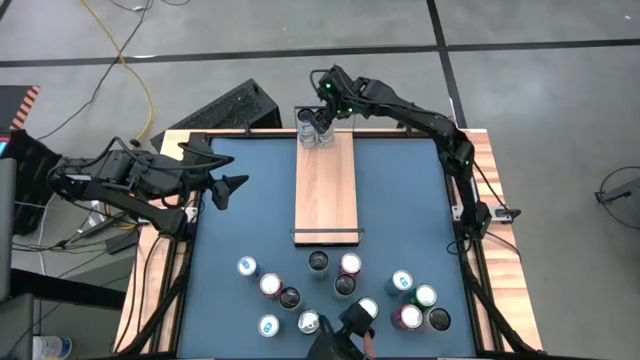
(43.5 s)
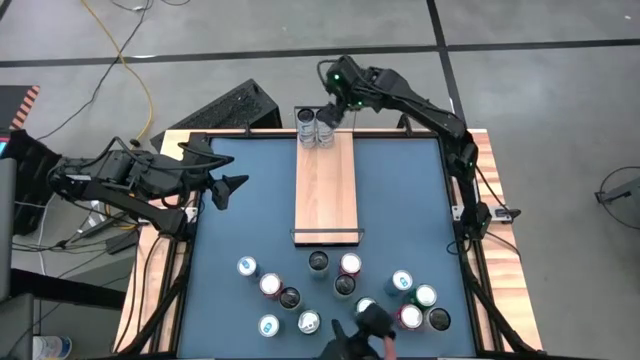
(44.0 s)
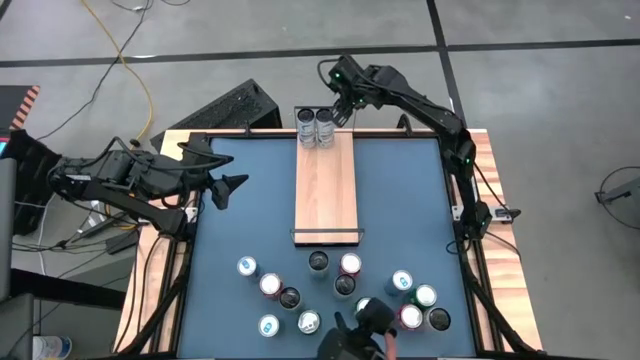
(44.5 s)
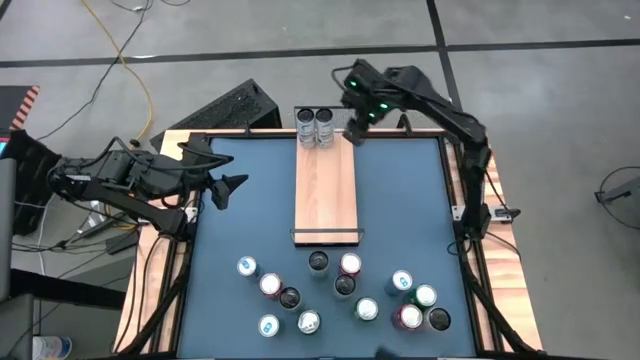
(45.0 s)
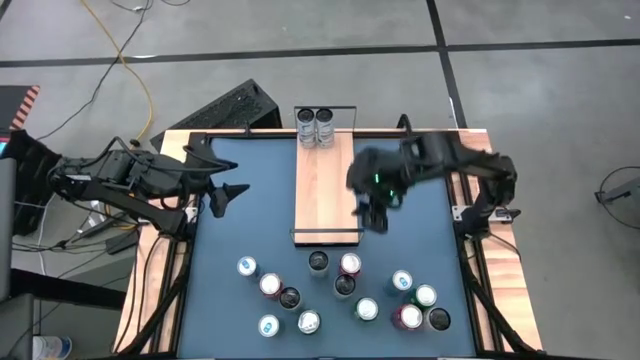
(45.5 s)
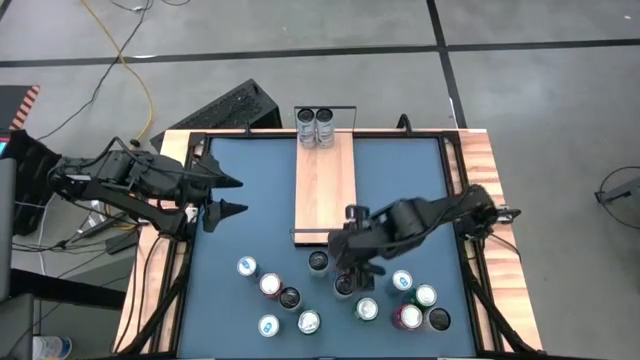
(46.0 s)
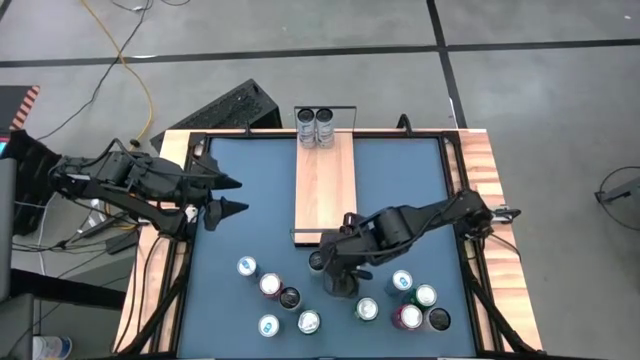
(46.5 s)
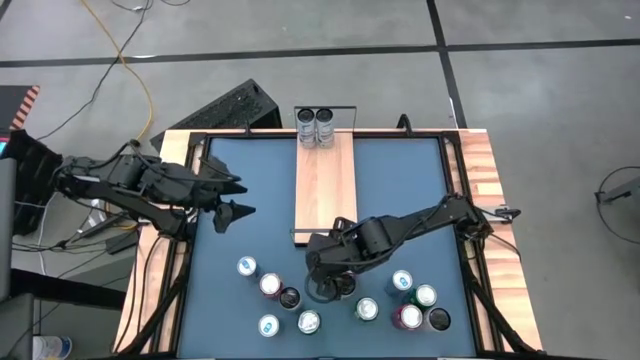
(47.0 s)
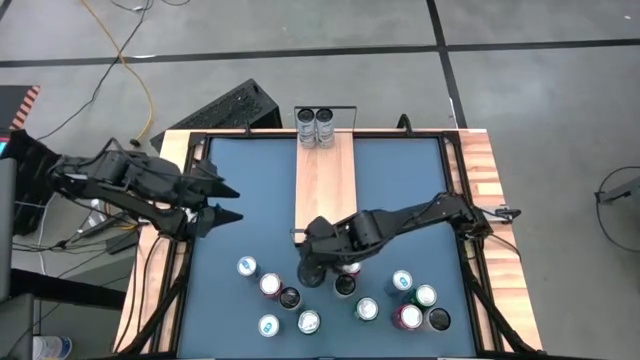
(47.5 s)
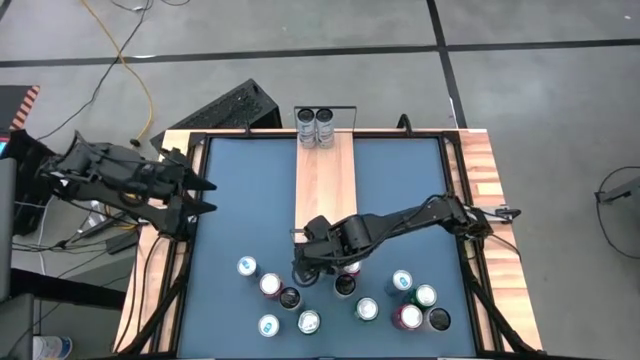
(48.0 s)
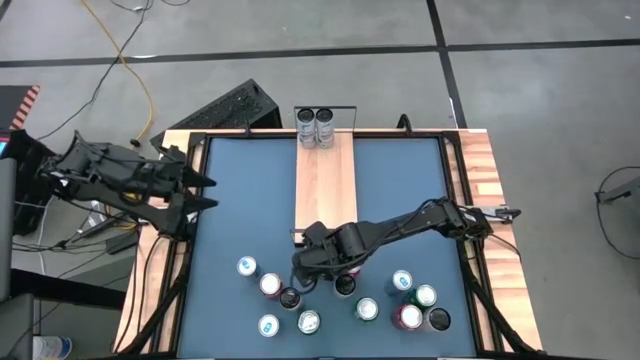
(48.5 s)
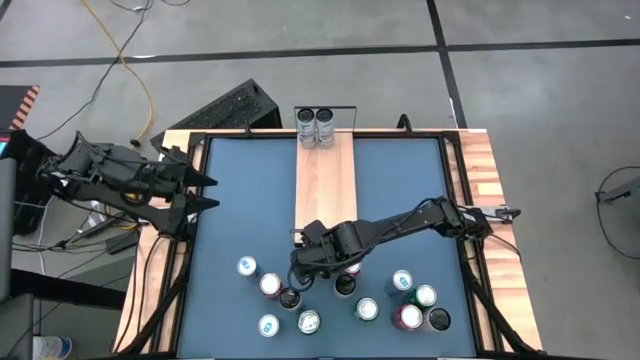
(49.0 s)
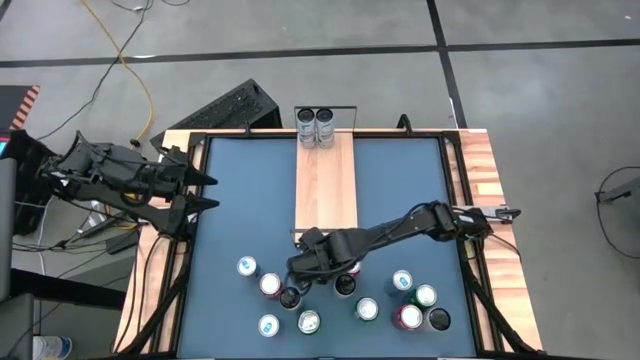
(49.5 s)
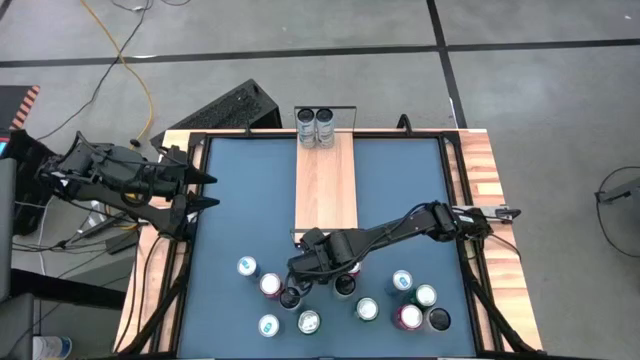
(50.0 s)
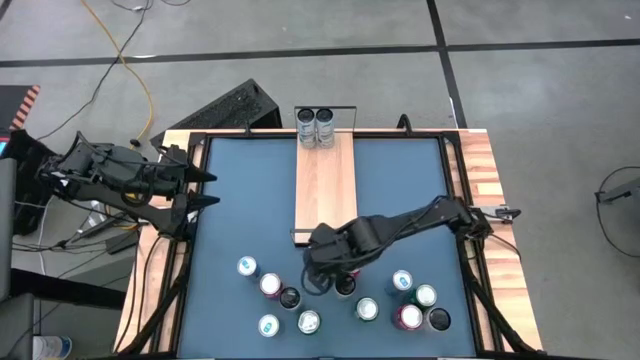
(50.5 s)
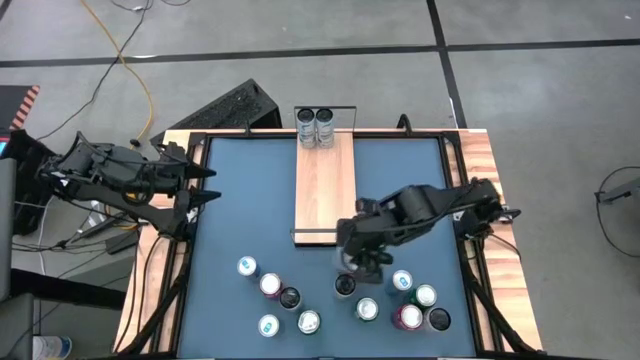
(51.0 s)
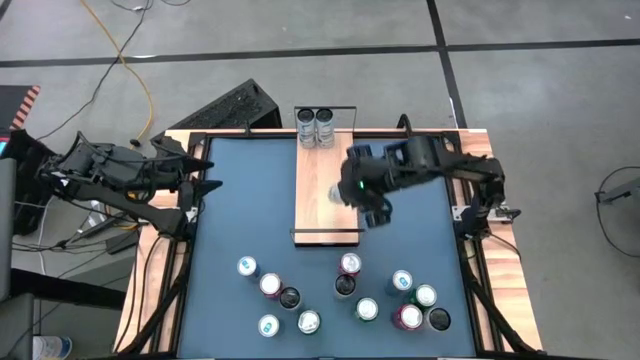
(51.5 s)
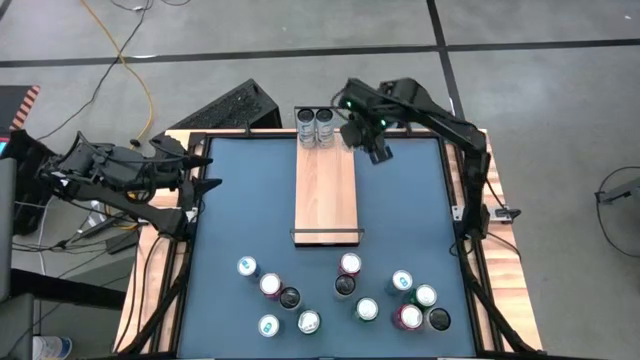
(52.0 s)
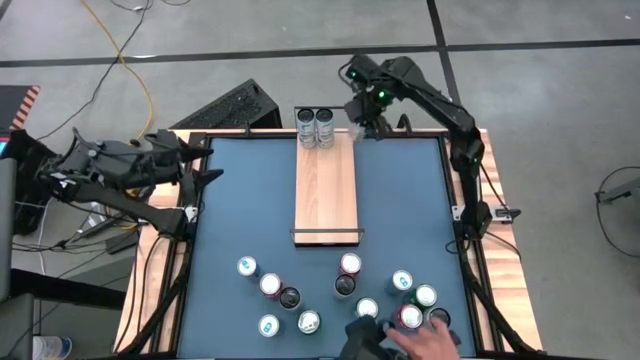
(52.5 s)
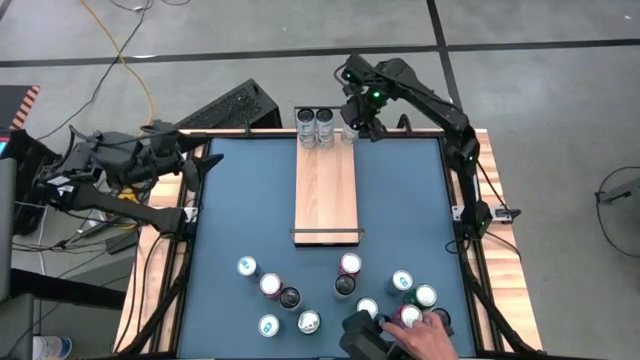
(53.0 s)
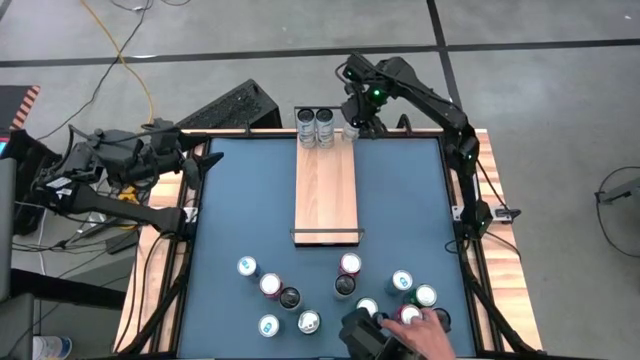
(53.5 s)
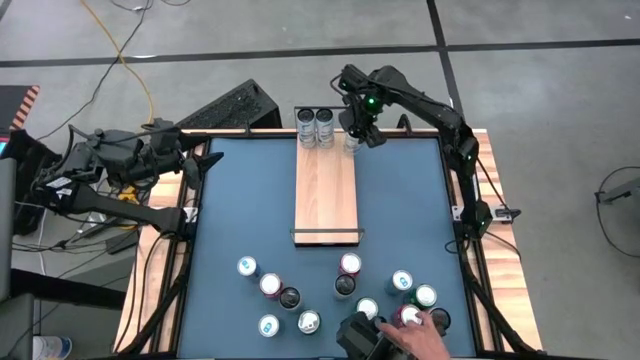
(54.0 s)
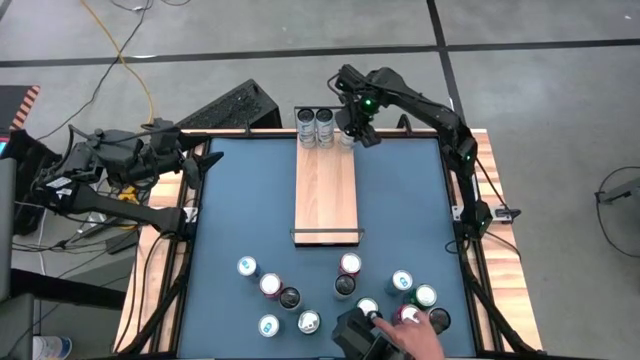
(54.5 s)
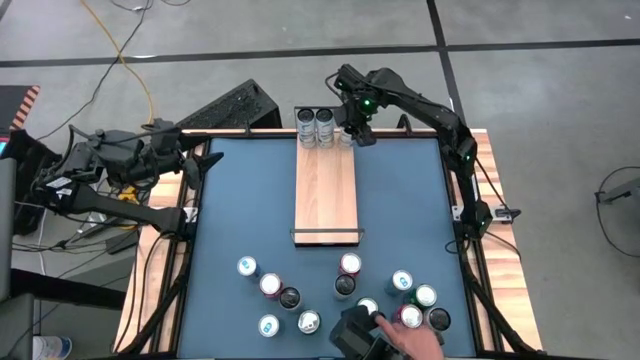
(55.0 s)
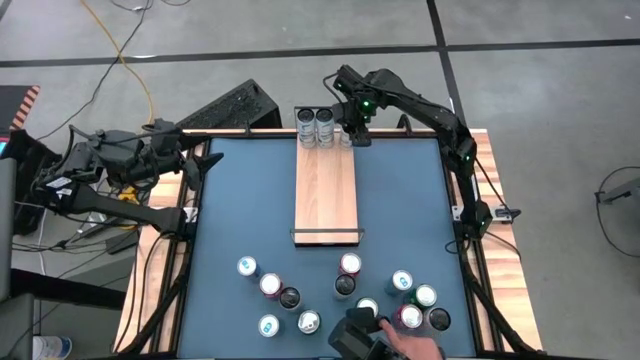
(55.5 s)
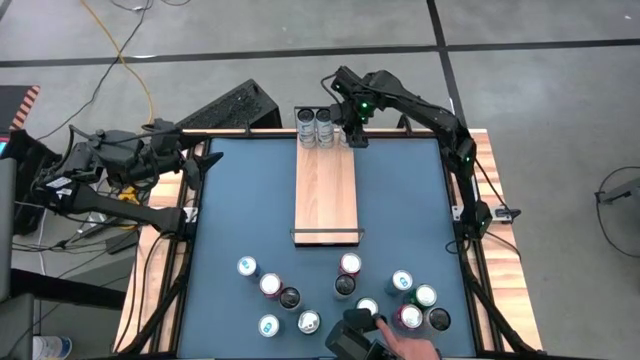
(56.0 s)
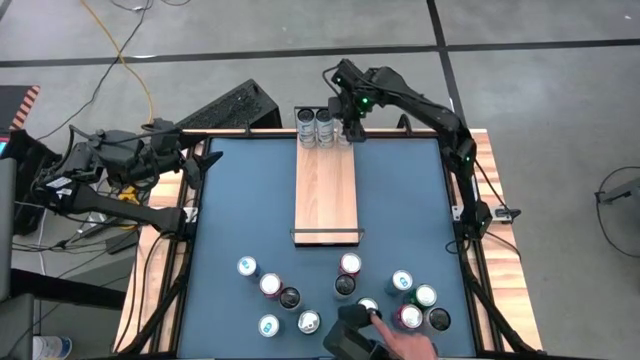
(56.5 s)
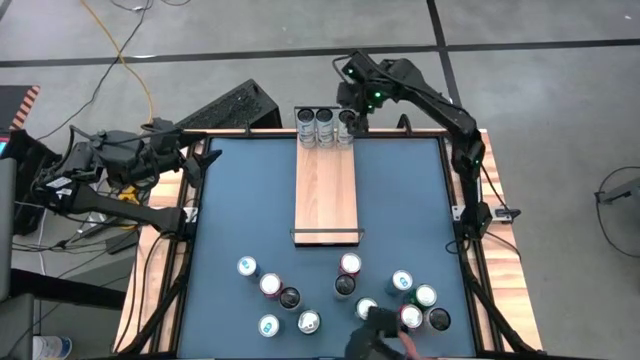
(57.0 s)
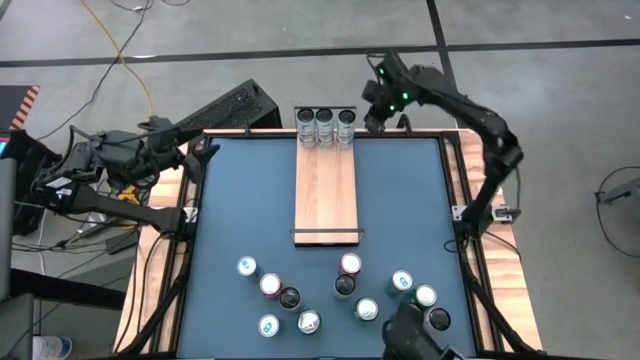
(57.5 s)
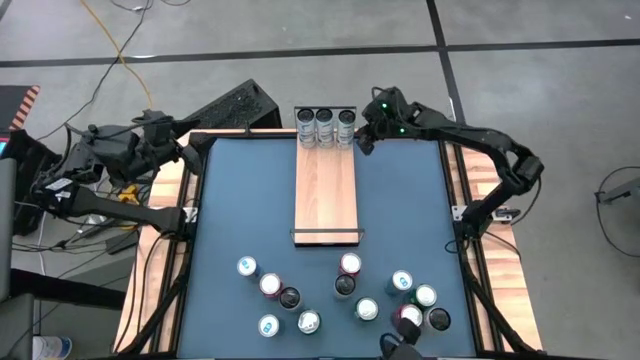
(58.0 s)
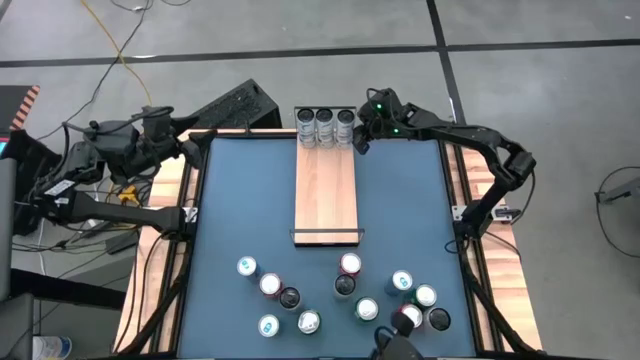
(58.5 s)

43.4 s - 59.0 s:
Task: Place canned beverage on shelf
Put the white blue soda can on the shelf aligned with the other white blue soda cans

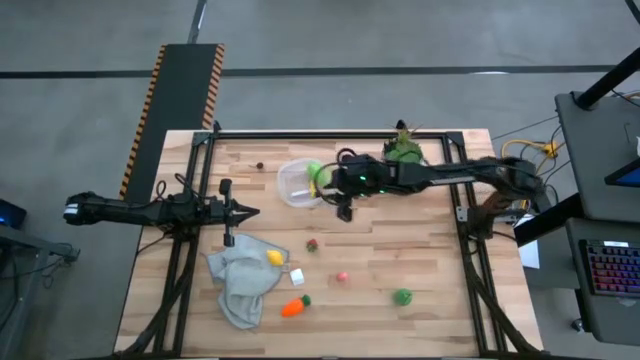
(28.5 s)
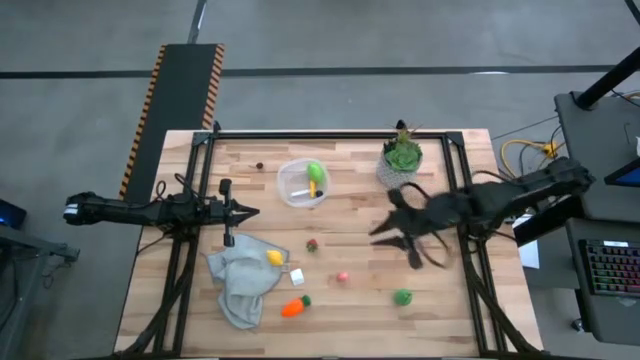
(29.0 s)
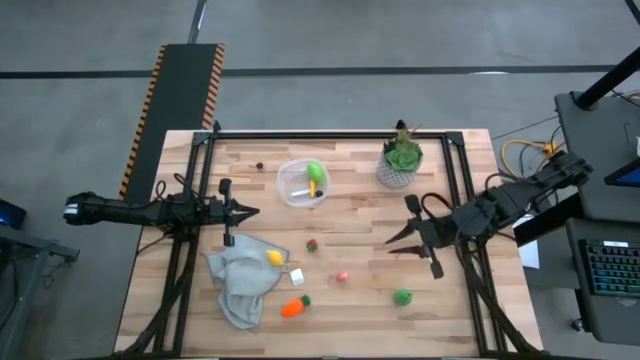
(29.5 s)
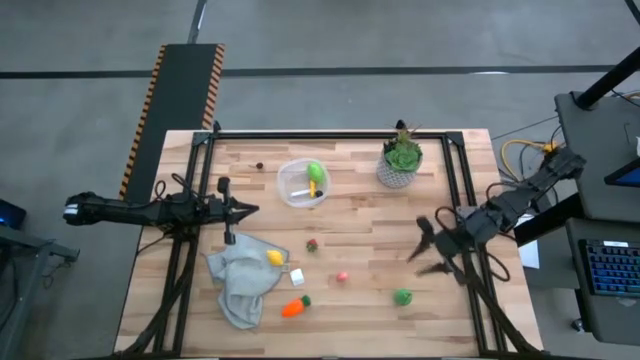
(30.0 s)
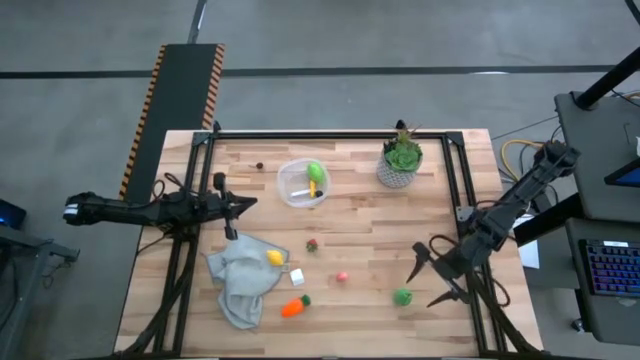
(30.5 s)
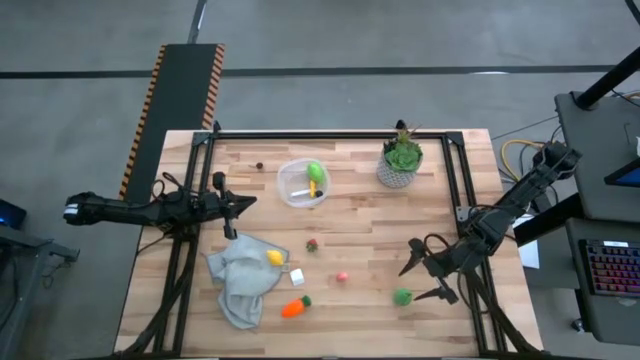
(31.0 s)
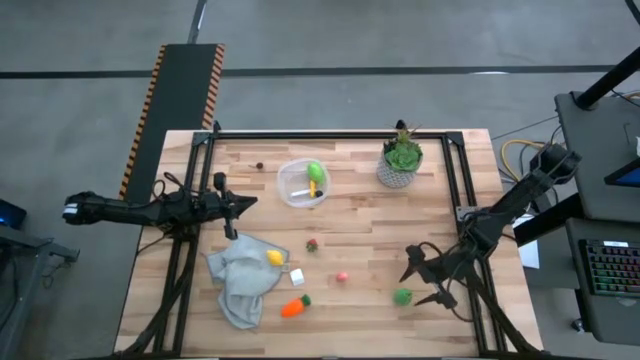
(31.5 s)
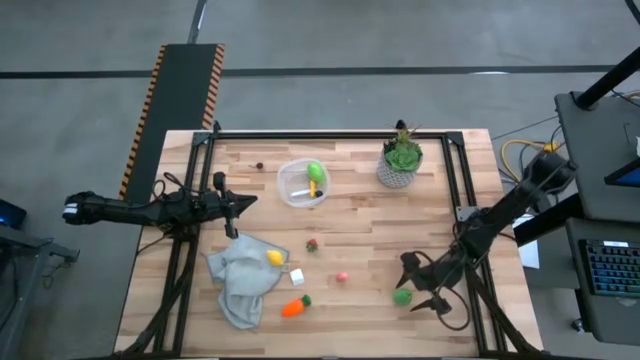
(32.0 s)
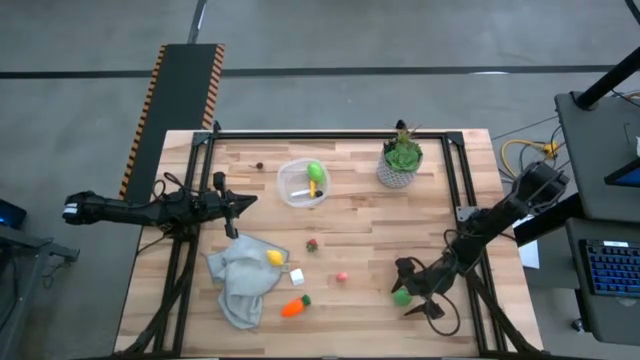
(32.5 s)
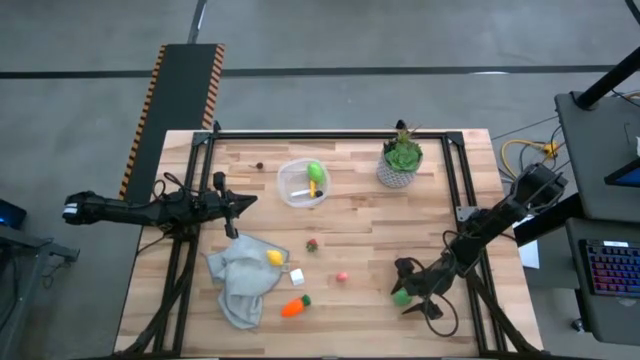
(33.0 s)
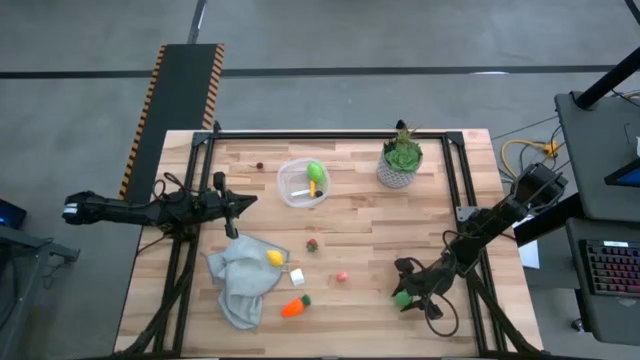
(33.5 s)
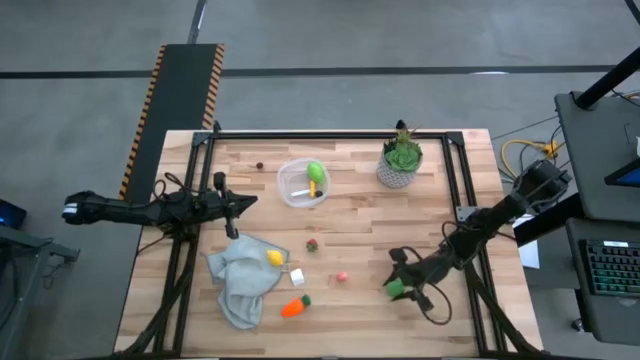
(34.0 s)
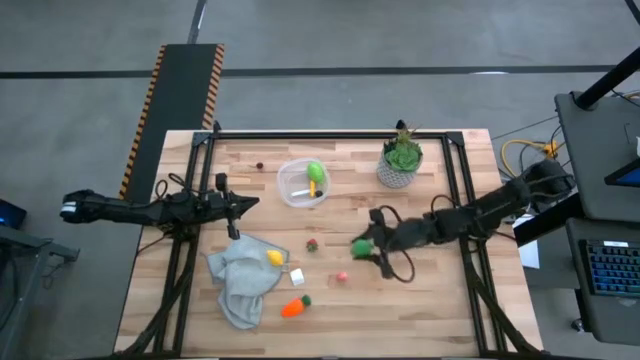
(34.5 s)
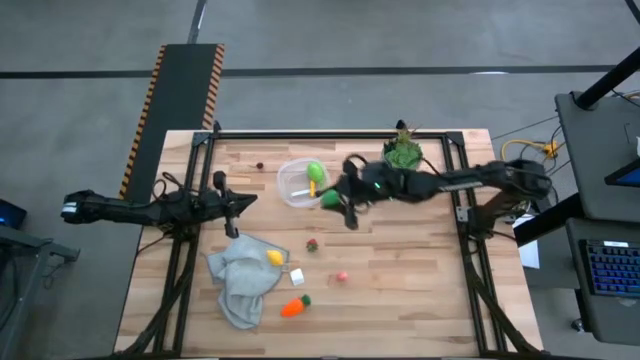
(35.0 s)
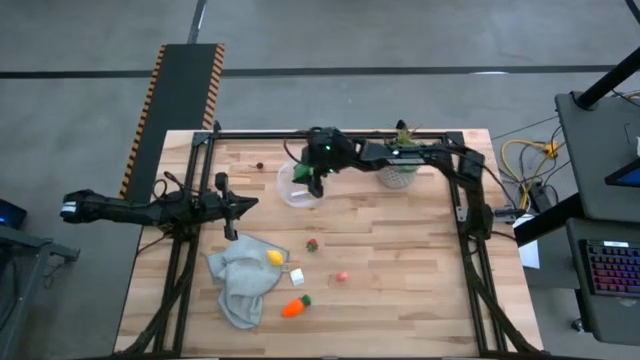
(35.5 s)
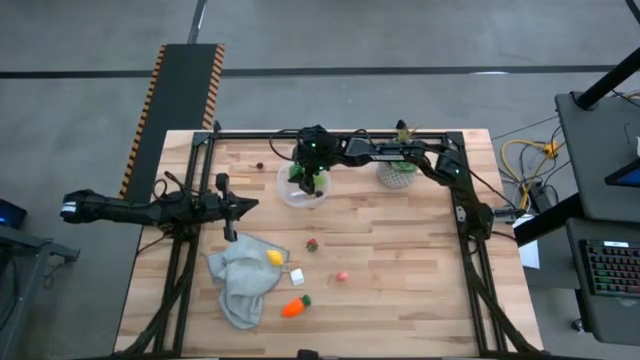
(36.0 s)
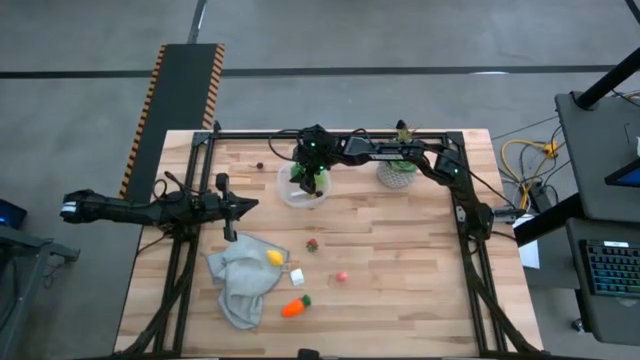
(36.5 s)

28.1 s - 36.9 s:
Task: Pick and placing Produce into tupperware
Put the green corn into the transparent bin
